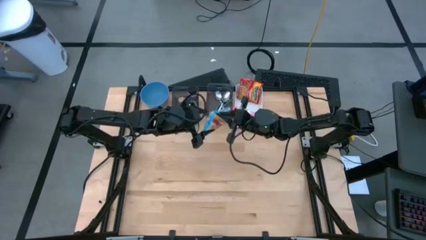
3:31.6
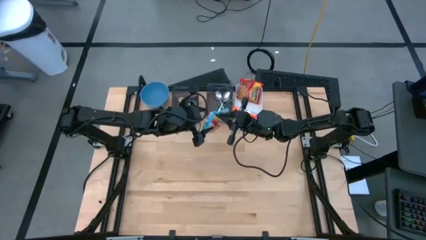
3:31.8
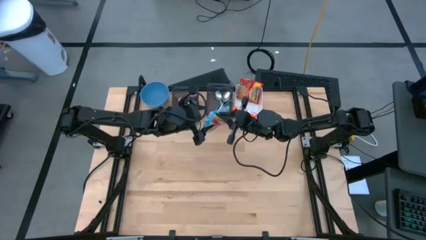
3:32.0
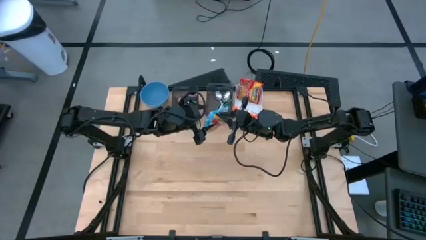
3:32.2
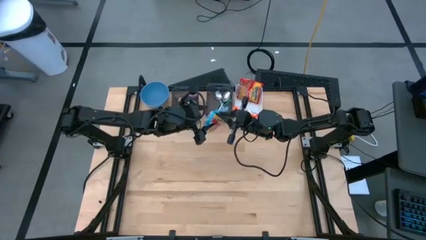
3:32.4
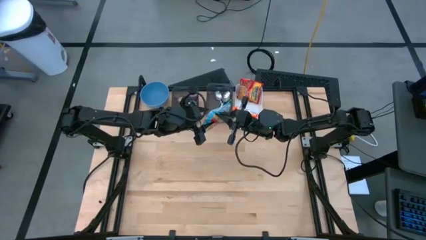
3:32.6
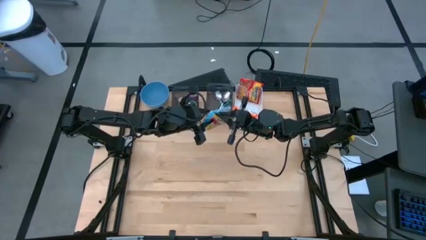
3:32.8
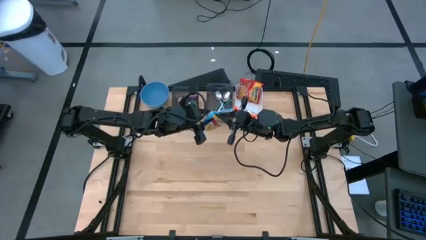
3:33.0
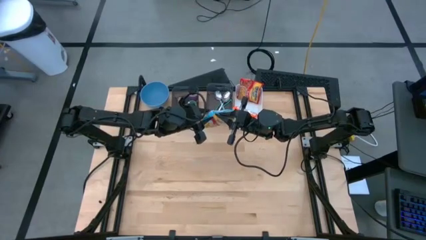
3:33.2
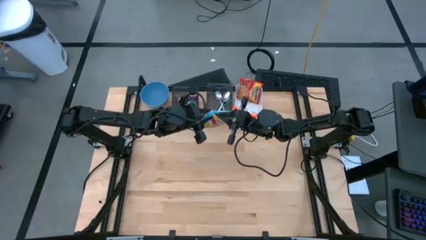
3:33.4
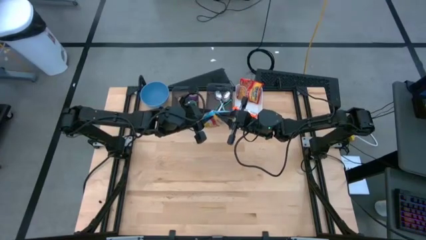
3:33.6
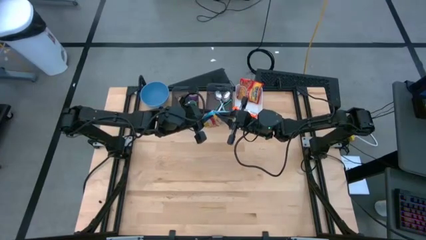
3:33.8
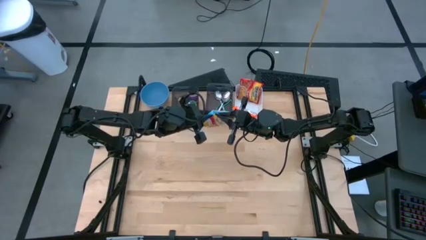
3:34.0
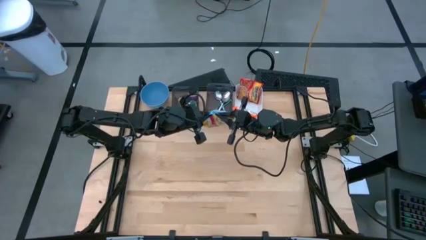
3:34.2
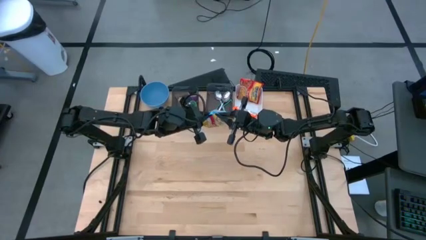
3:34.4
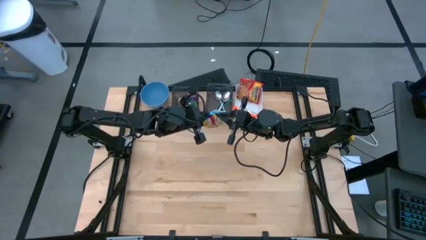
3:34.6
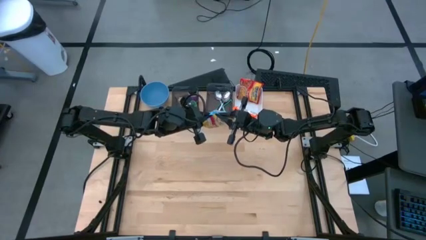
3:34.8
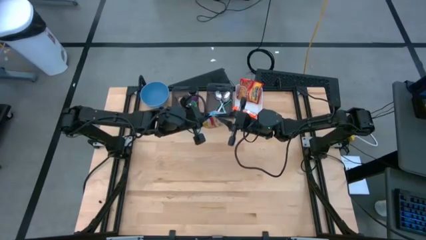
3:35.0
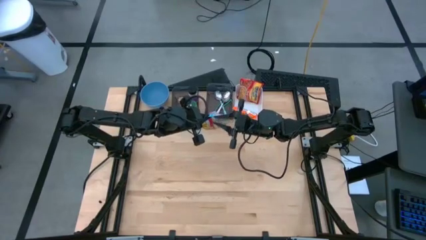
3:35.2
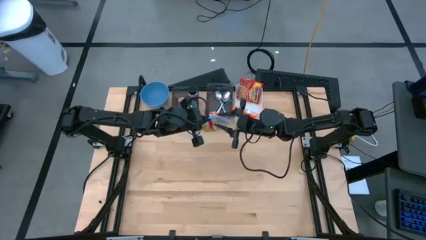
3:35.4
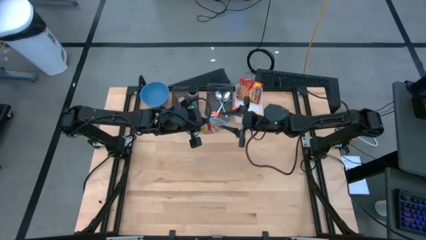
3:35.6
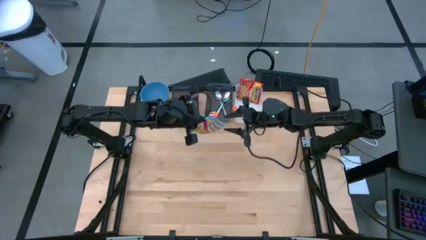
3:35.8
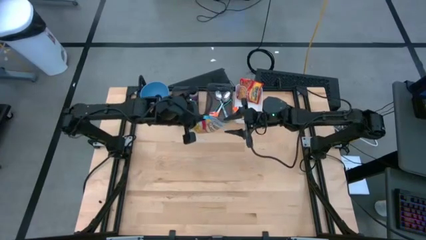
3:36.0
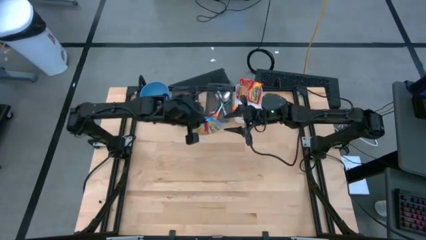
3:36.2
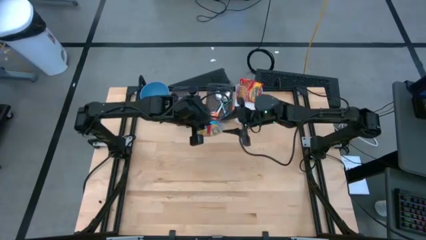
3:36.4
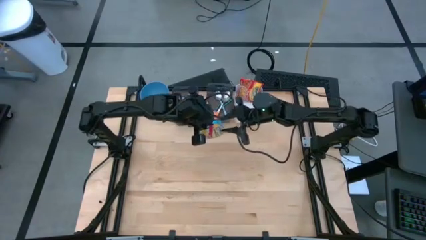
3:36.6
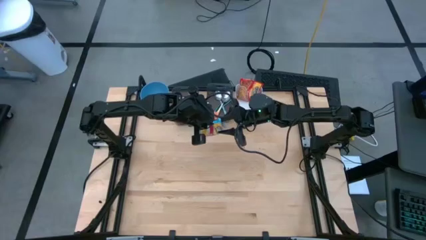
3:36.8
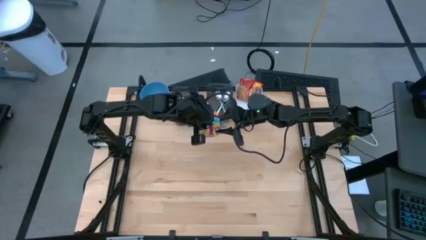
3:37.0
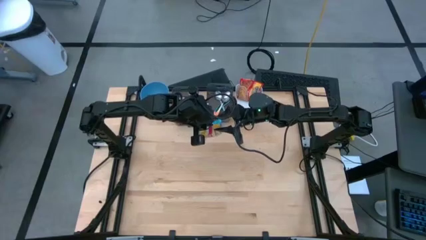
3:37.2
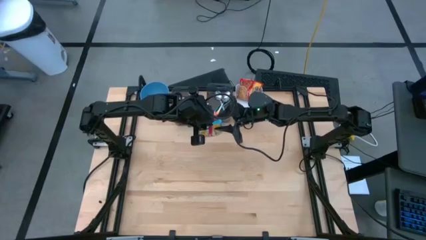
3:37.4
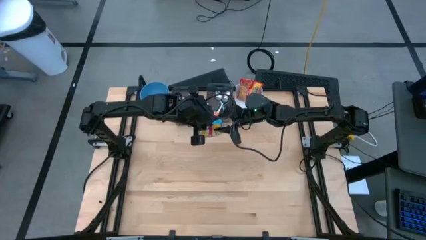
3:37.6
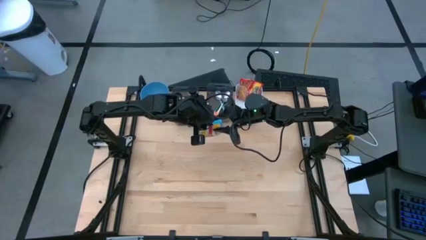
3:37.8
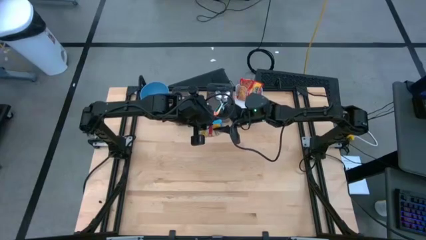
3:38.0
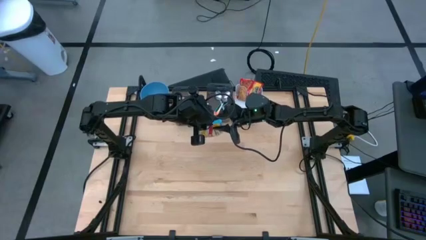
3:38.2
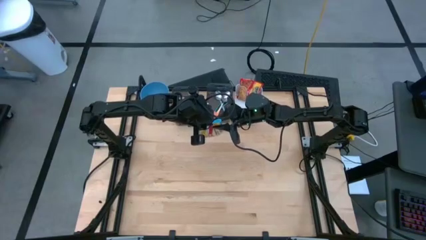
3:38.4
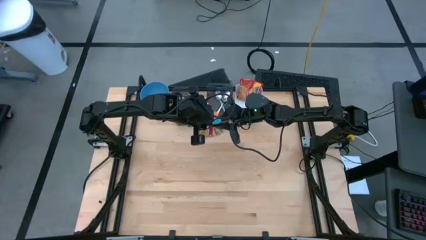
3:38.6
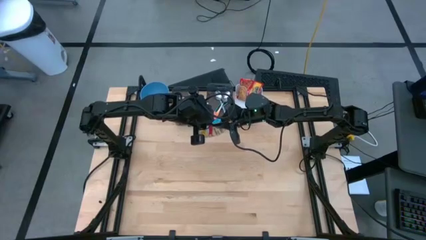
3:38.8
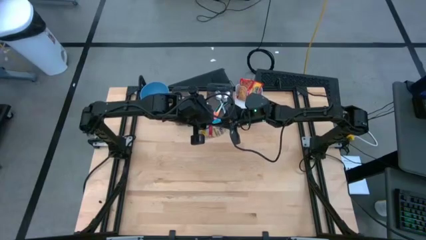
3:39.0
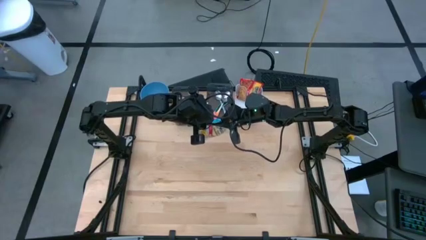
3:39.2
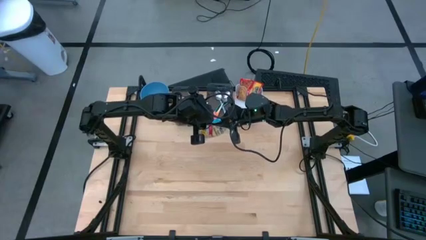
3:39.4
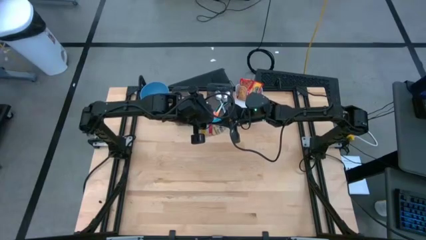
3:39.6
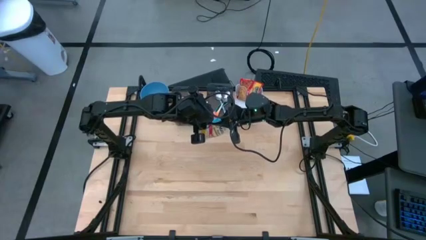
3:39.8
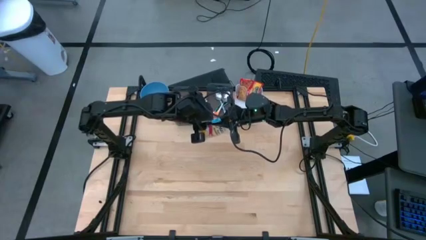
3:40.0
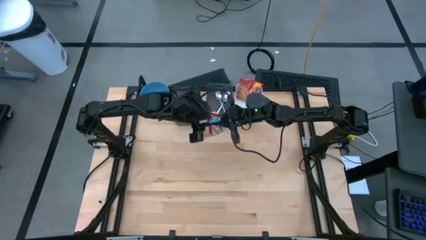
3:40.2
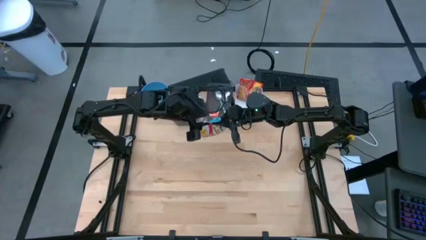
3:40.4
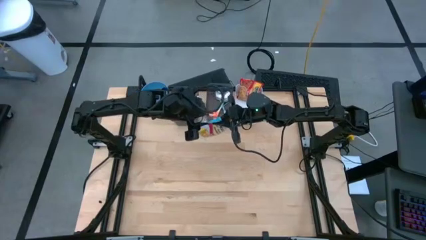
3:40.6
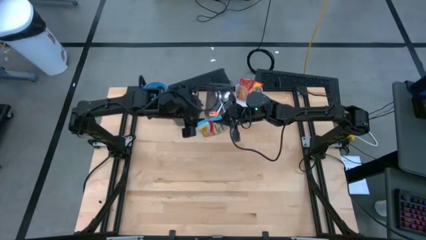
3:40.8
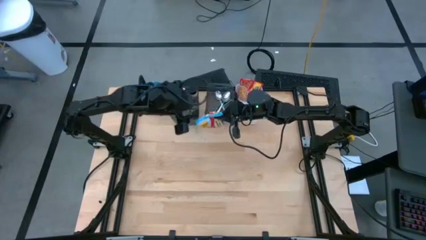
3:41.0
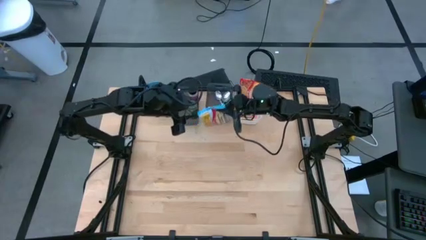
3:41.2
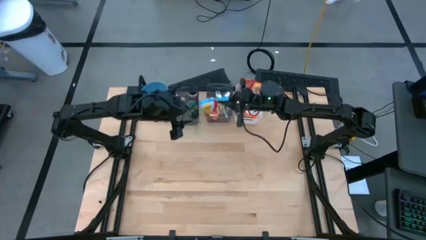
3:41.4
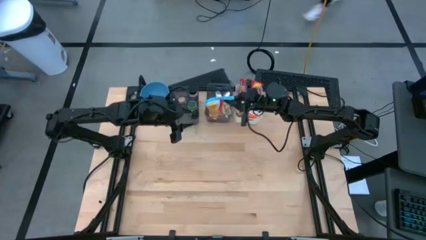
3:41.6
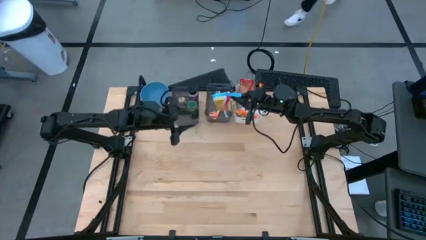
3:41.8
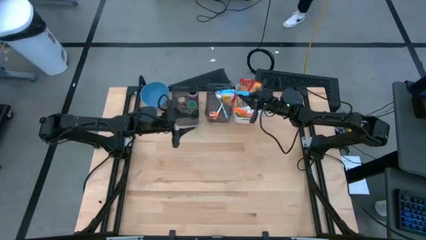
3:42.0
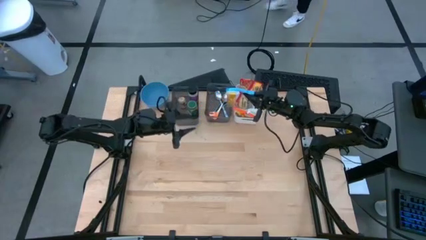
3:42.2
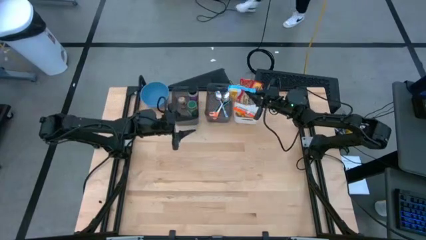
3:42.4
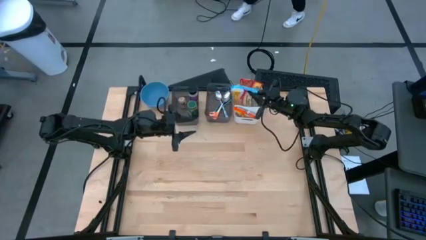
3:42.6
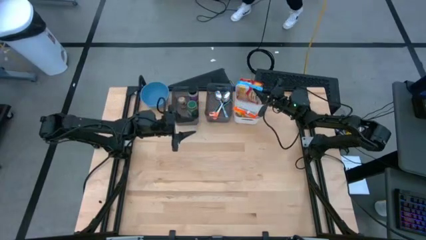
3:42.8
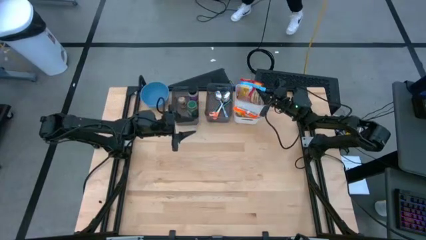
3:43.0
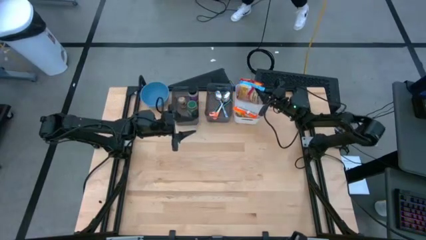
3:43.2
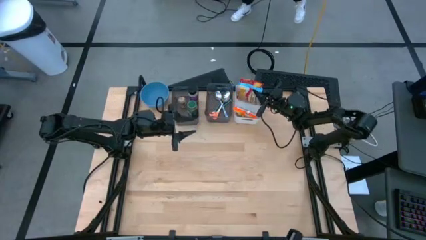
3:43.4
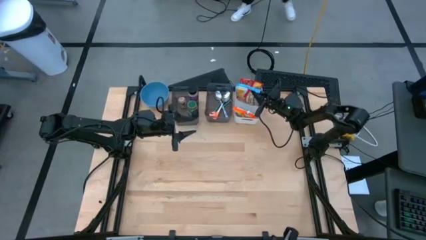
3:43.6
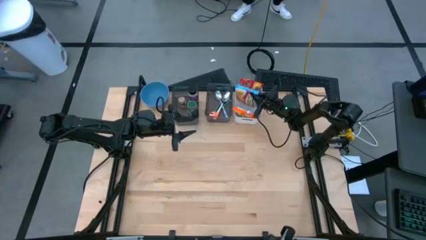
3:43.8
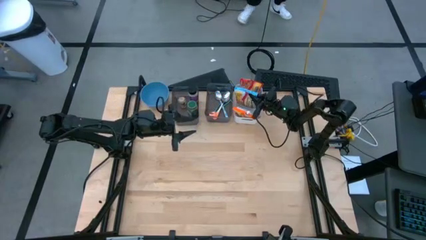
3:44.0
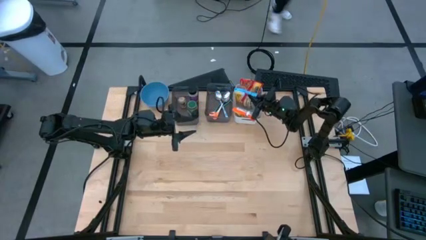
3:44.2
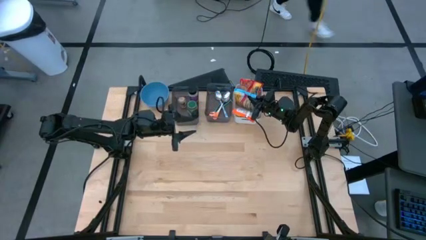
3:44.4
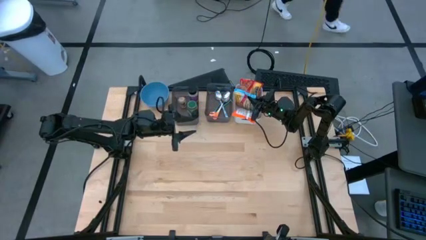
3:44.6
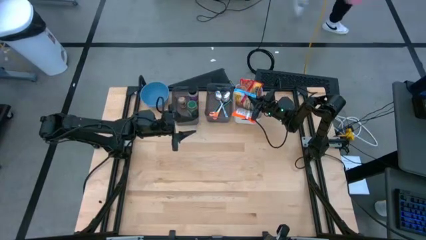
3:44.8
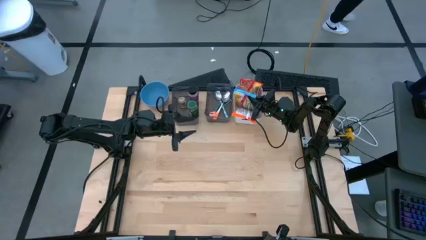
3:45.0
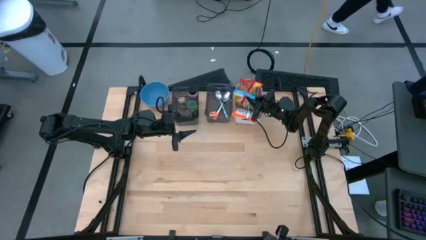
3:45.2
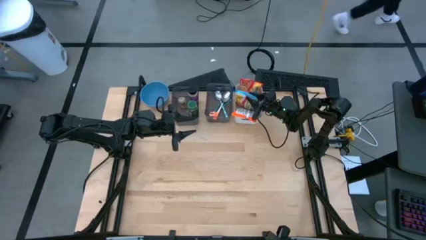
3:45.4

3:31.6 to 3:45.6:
Task: Pick & Place Food Item
Put the light blue noodle pack into the white bin

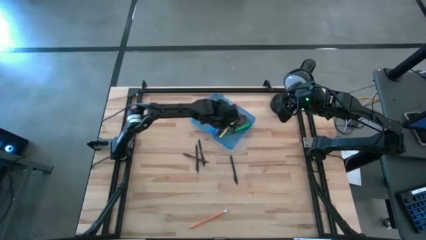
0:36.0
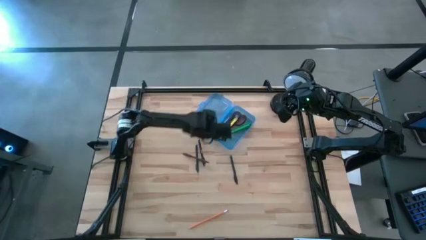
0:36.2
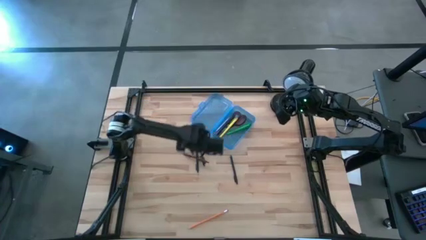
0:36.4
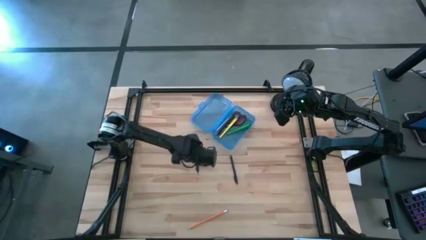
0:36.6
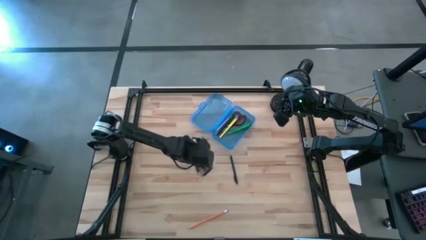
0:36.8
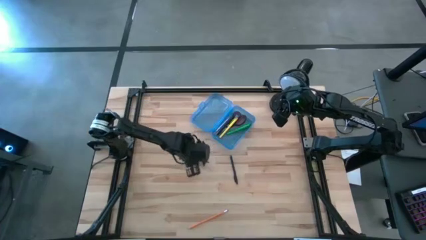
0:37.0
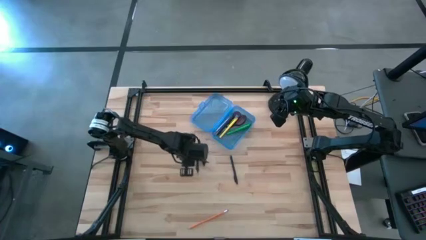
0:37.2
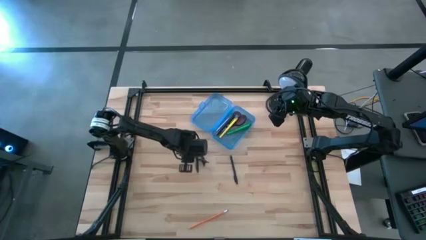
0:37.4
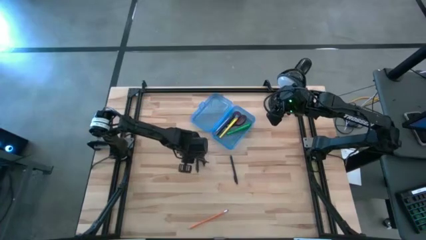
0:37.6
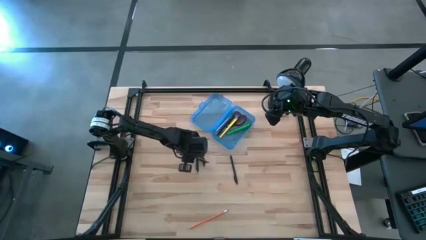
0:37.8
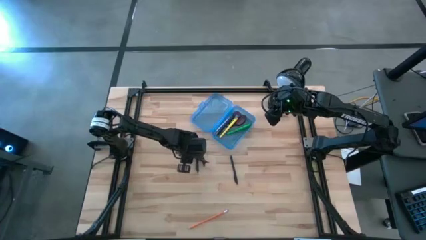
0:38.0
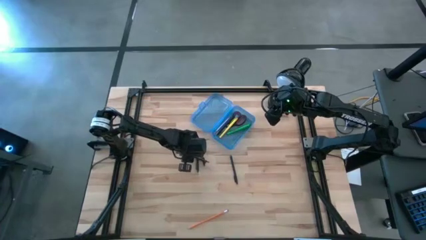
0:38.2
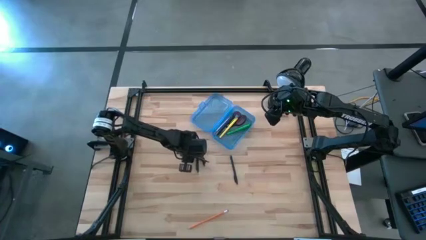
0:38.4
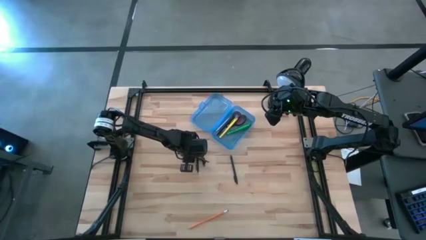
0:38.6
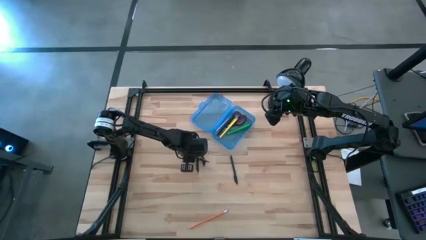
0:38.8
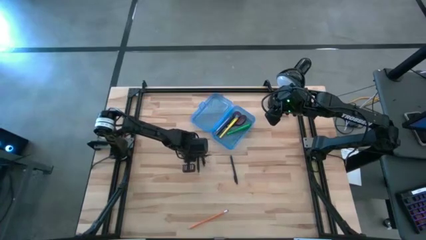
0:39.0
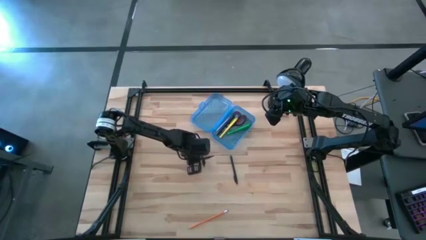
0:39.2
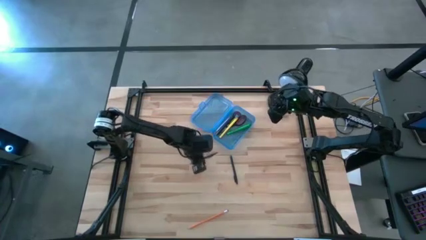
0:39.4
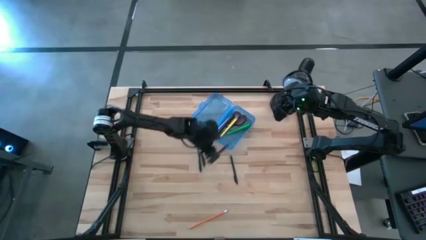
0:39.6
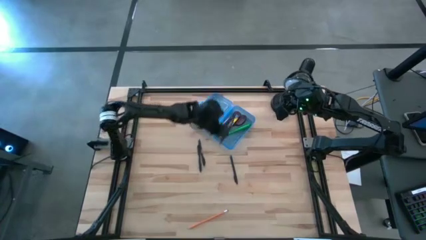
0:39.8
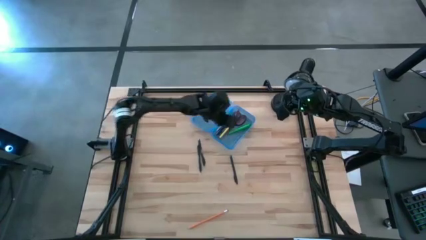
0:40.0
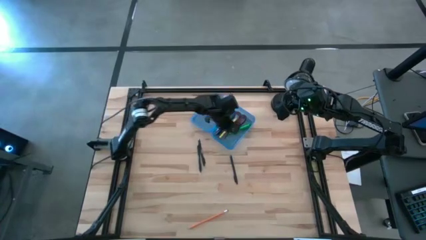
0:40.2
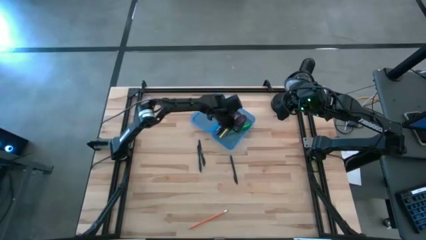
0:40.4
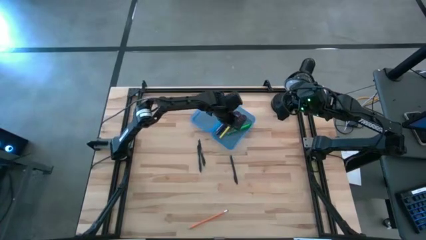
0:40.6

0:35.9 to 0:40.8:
Task: Pick & place school supplies into a supply box
Put the brown pen into the blue supply box
